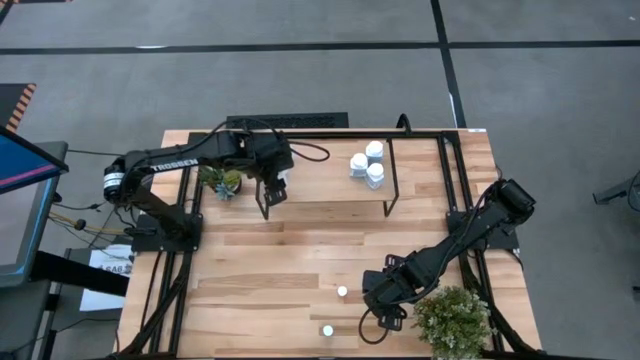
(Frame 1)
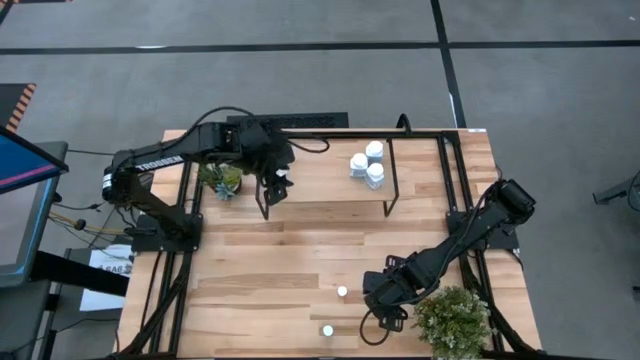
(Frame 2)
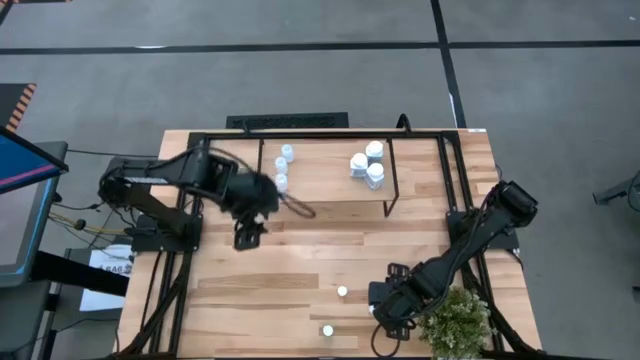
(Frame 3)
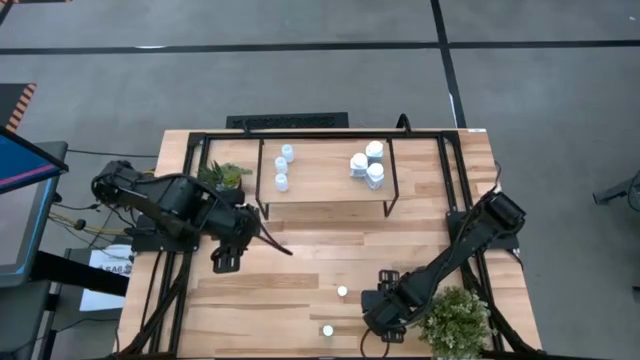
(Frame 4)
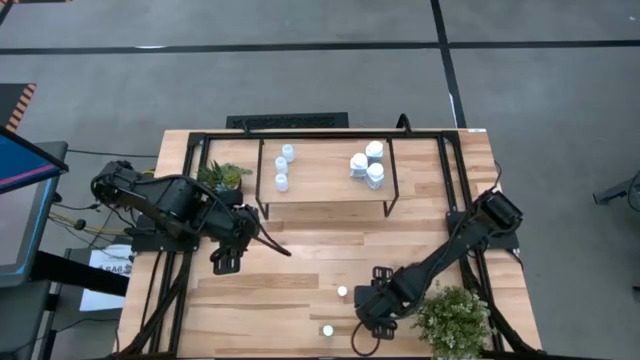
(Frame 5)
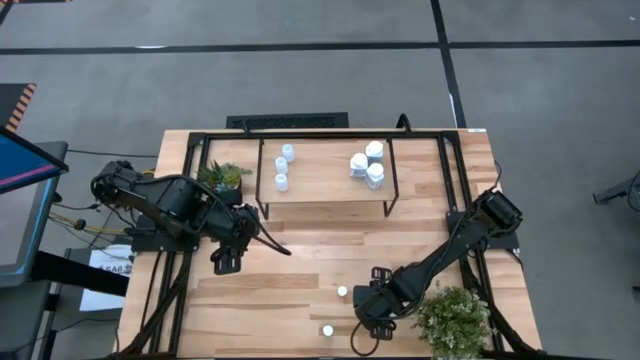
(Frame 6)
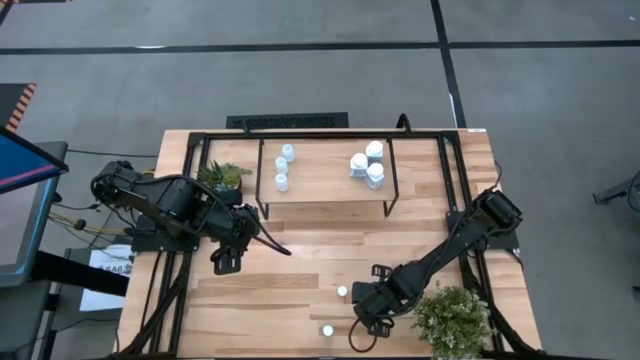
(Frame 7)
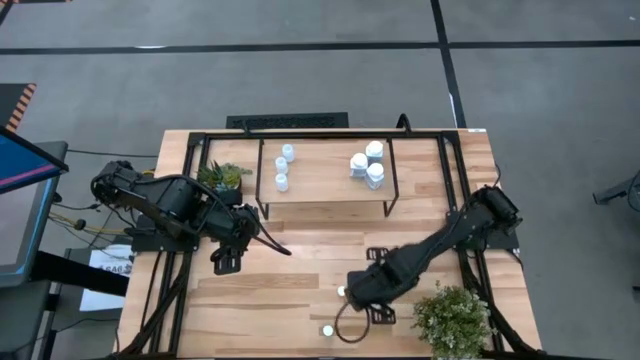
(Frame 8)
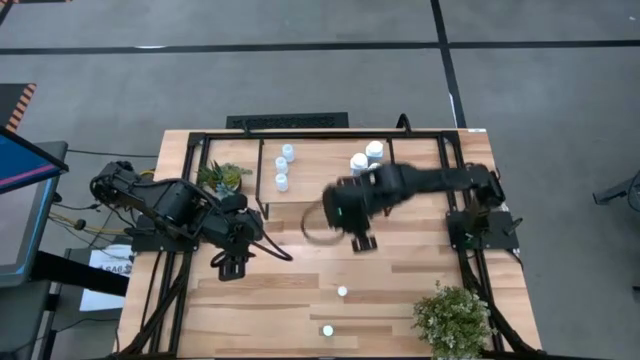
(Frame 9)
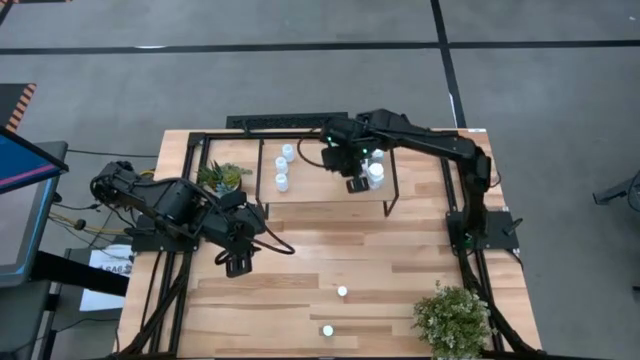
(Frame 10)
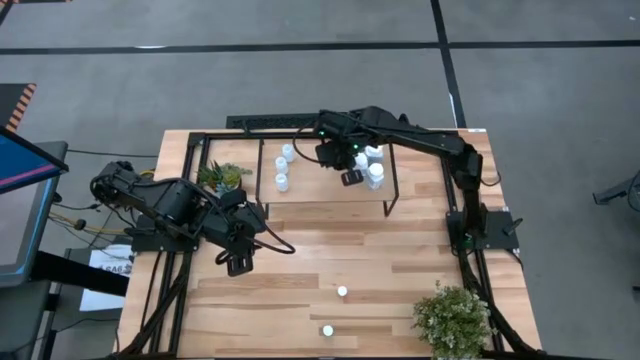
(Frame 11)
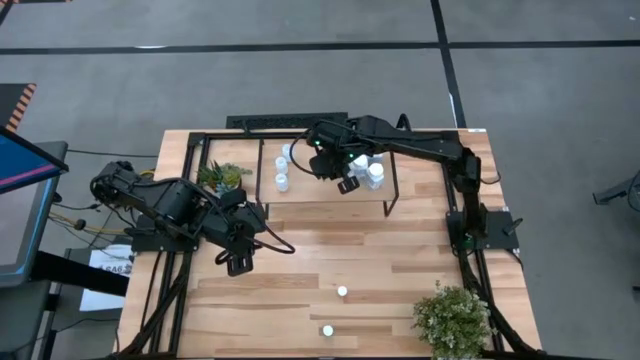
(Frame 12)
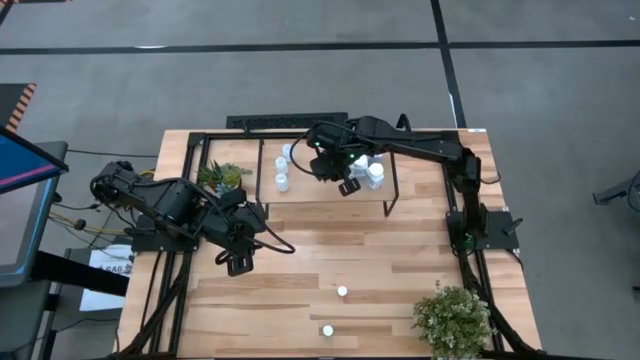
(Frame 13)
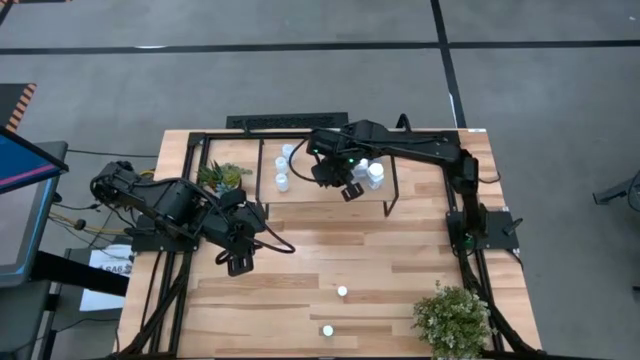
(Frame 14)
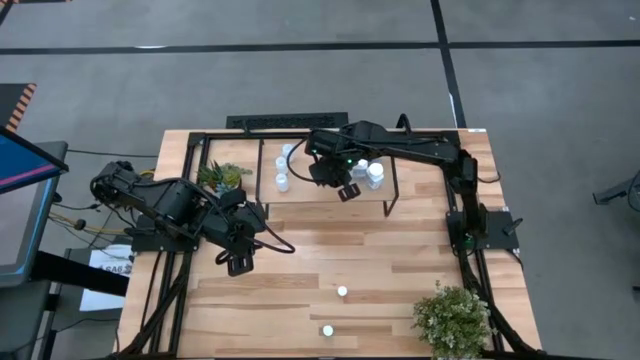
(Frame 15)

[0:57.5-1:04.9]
Task: Pick and place medicine bottles onto shelf by color
Put the yellow pill bottle on the shelf

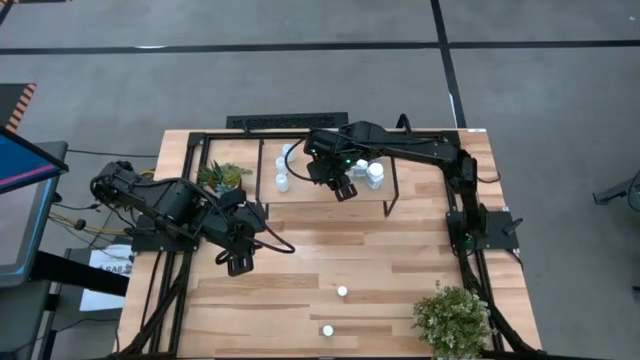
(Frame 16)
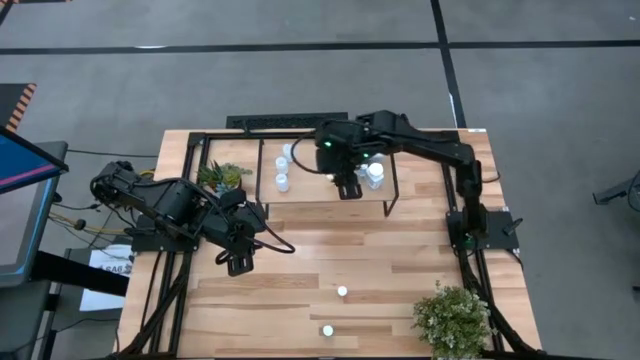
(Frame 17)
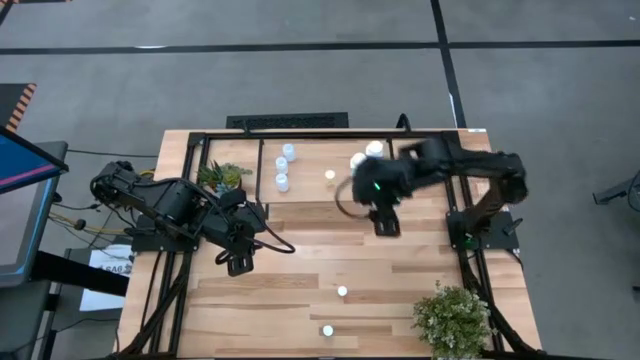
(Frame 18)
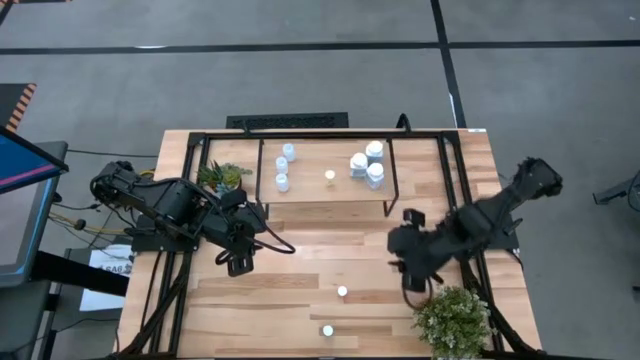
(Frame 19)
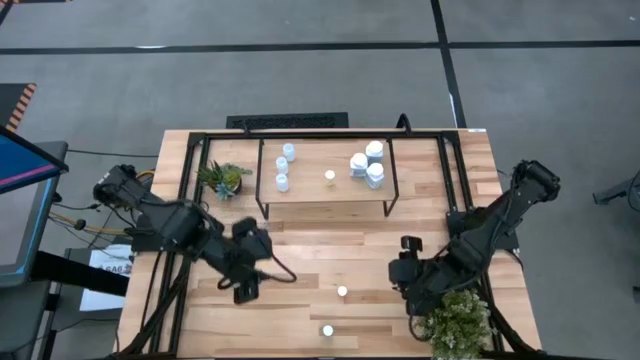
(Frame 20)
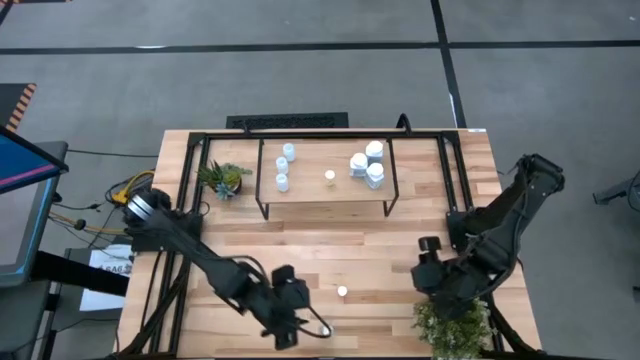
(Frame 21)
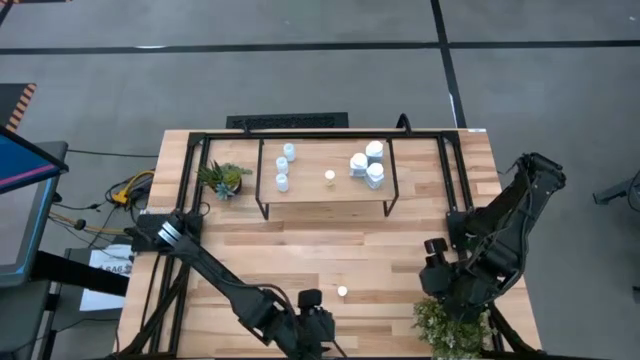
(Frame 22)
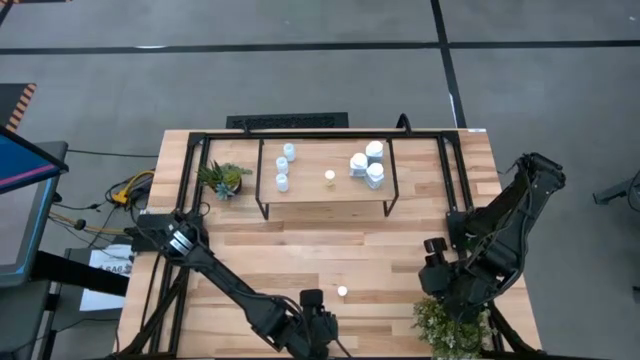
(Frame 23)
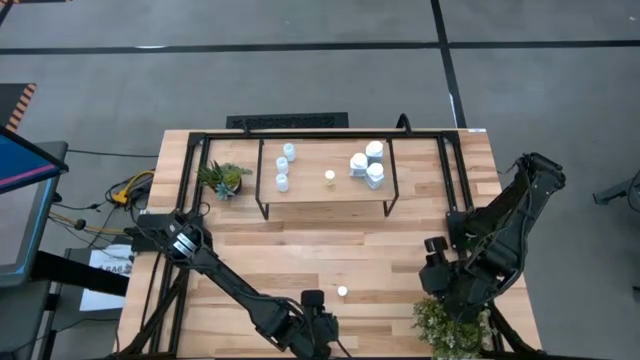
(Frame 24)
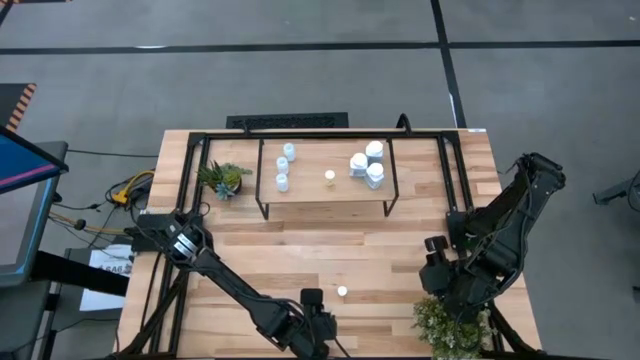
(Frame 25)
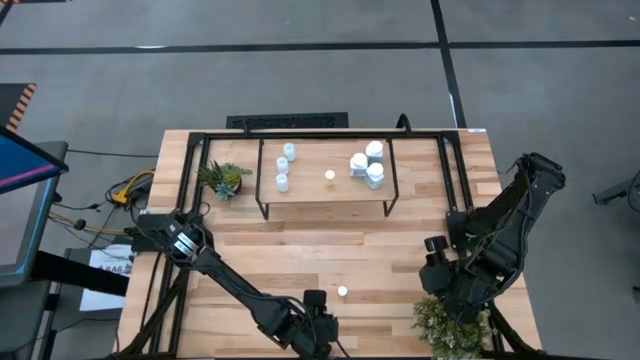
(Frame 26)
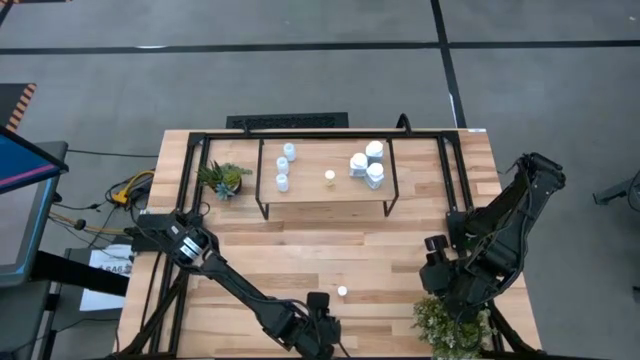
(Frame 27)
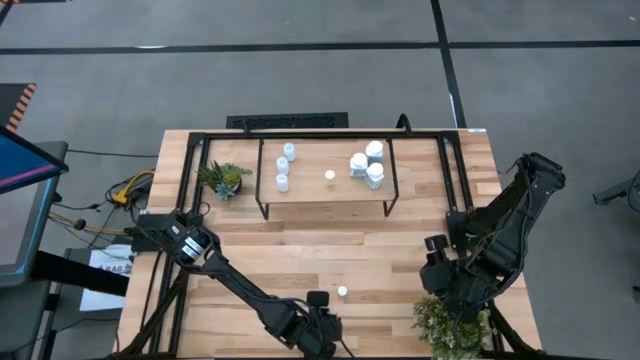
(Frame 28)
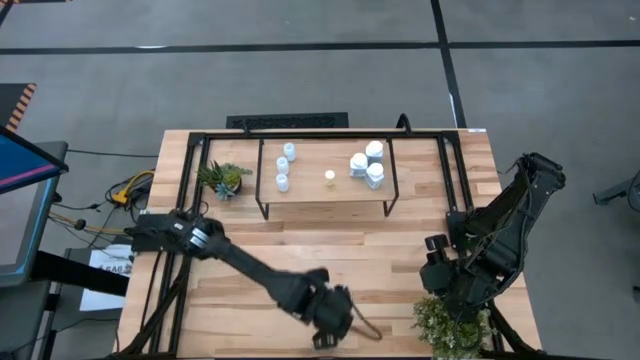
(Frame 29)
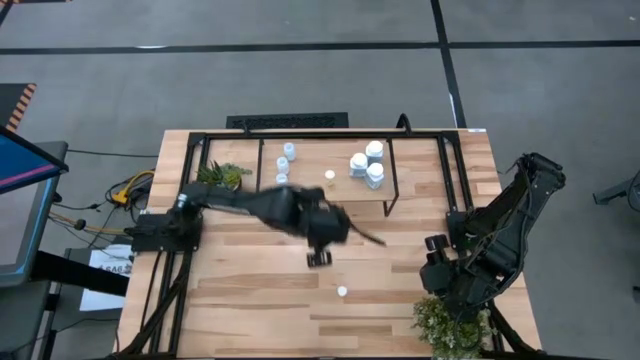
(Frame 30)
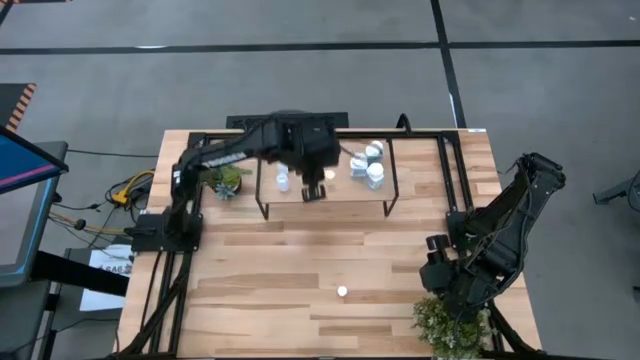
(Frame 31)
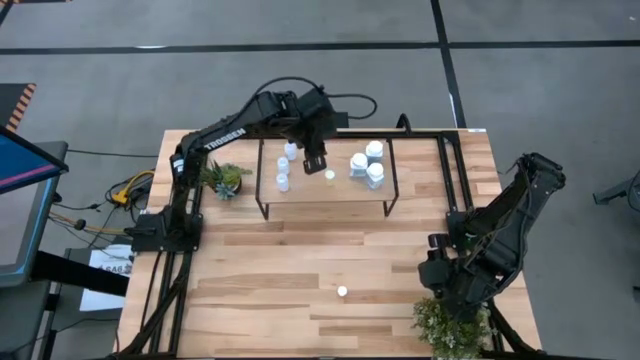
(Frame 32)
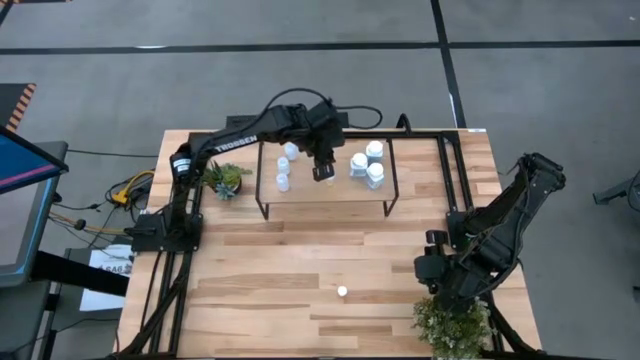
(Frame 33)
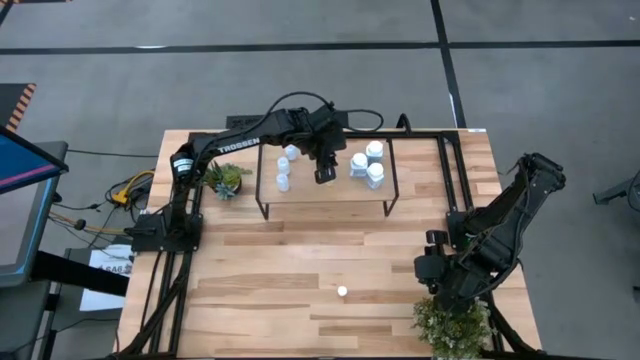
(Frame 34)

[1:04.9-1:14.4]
Put the blue pill bottle on the shelf

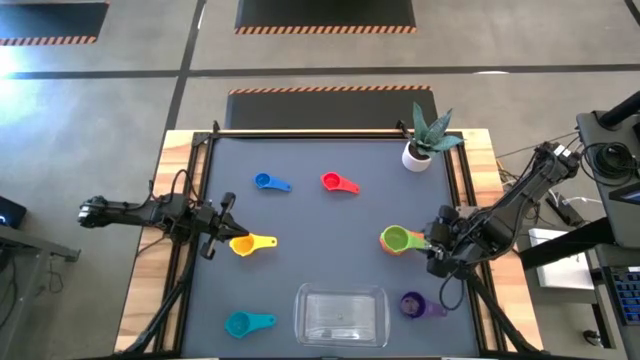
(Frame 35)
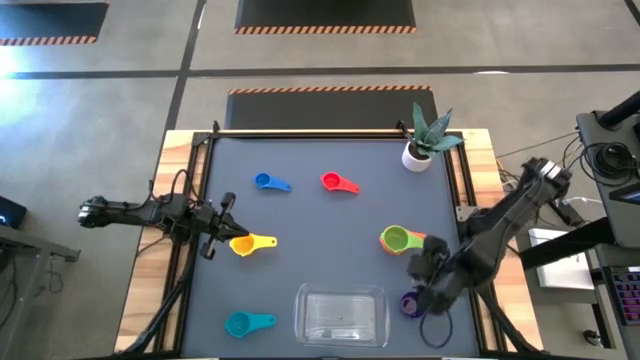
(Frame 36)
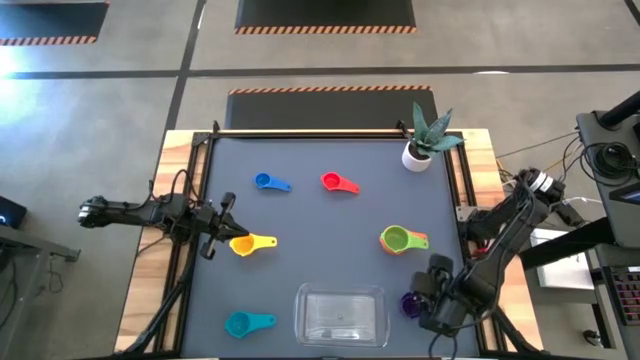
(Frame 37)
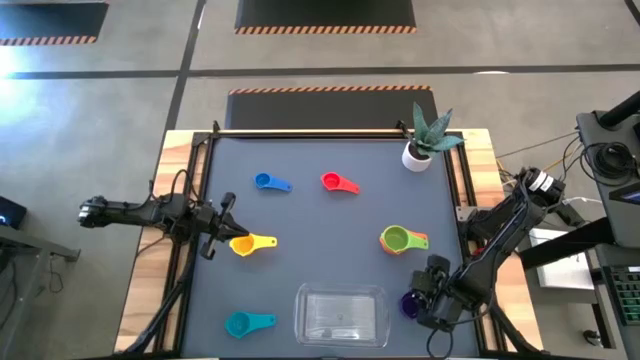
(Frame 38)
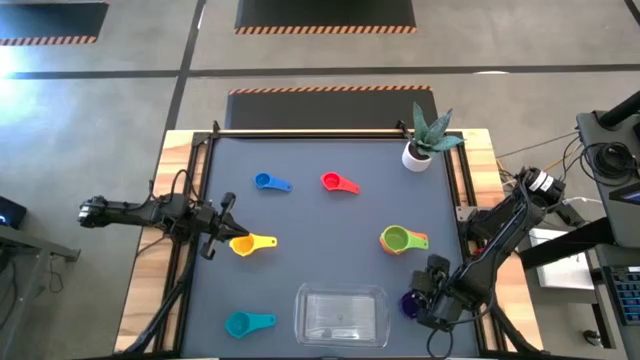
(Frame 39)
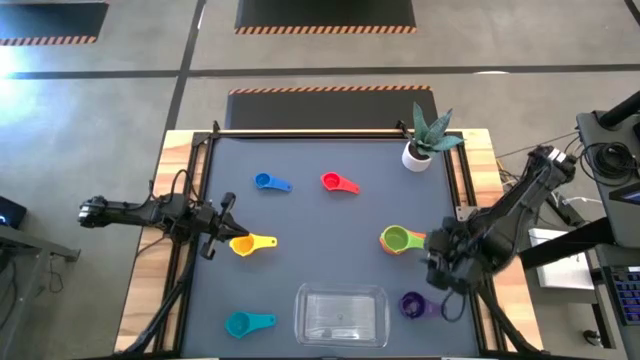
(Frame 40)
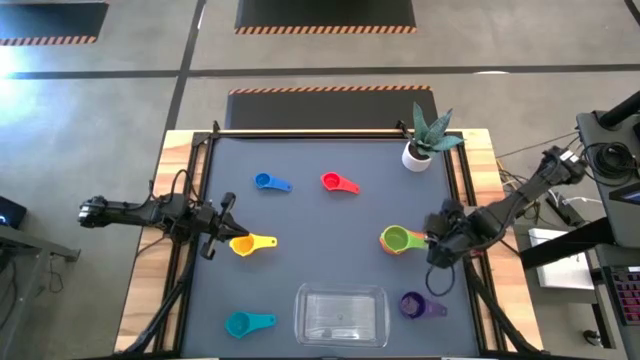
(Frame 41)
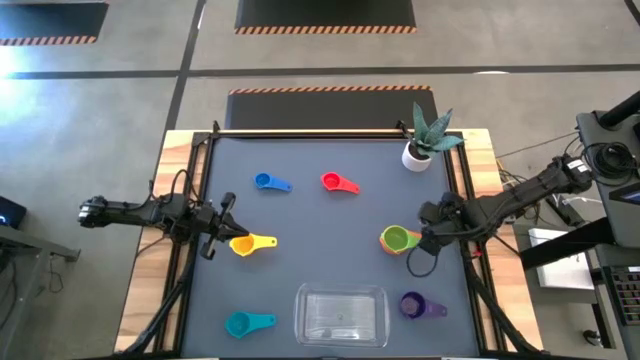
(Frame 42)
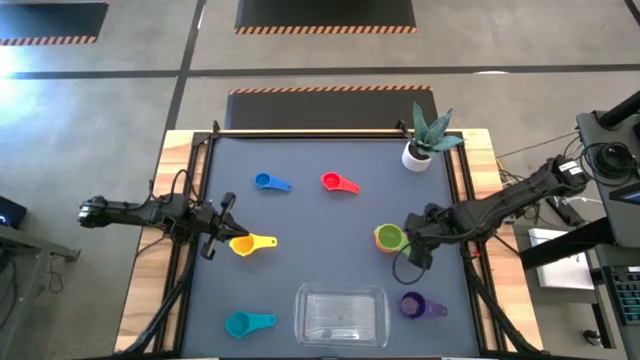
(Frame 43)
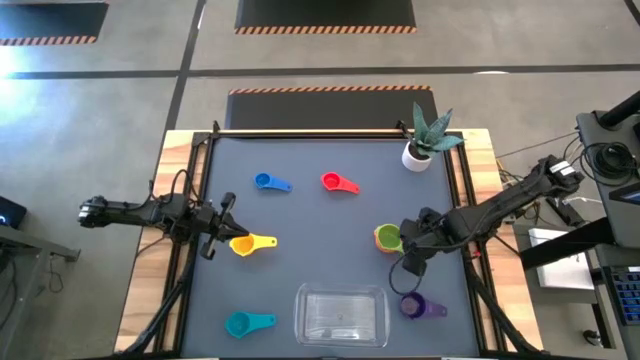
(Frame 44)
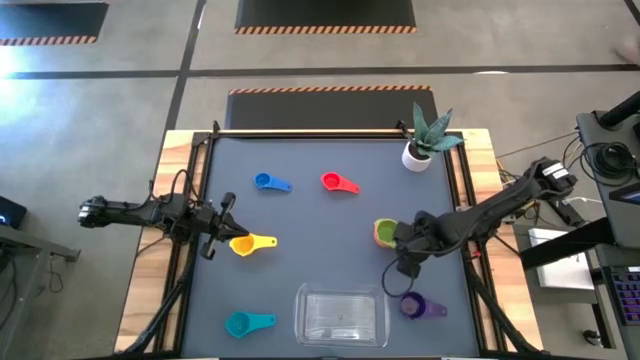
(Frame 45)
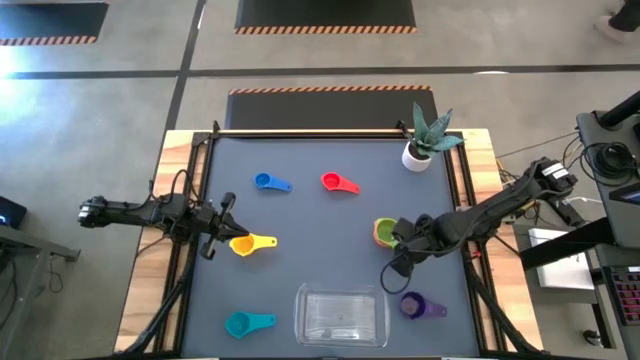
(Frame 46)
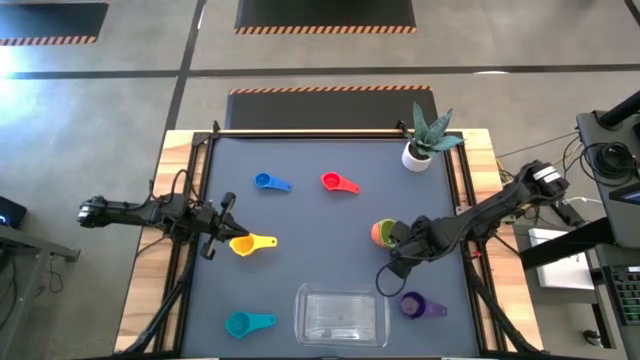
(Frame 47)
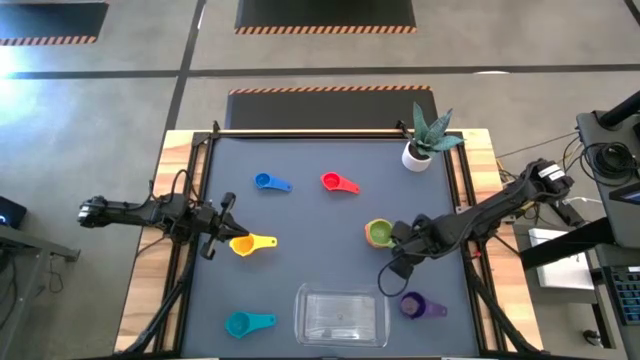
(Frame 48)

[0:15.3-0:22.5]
Task: Nest measuring cups in basket
Adjust the green measuring cup
